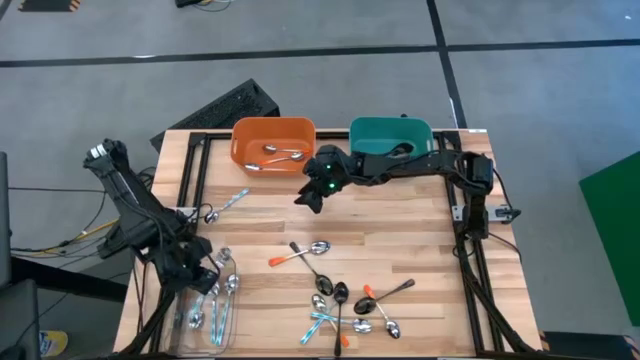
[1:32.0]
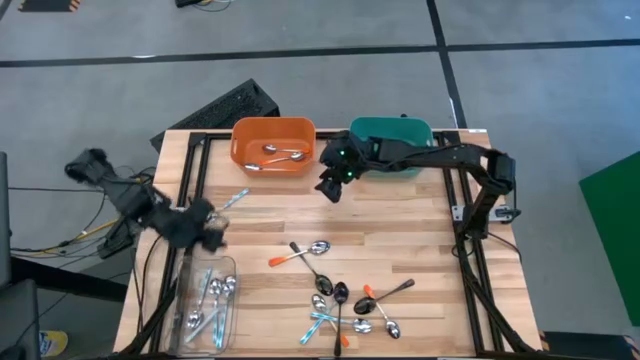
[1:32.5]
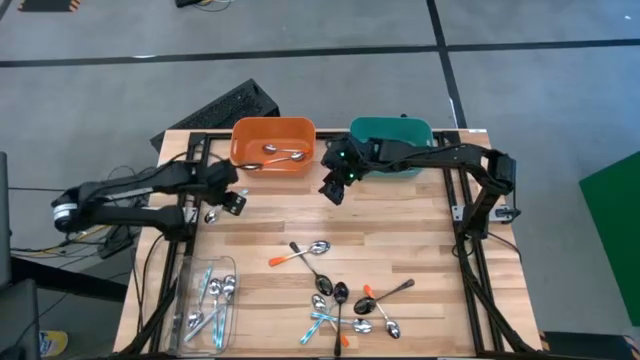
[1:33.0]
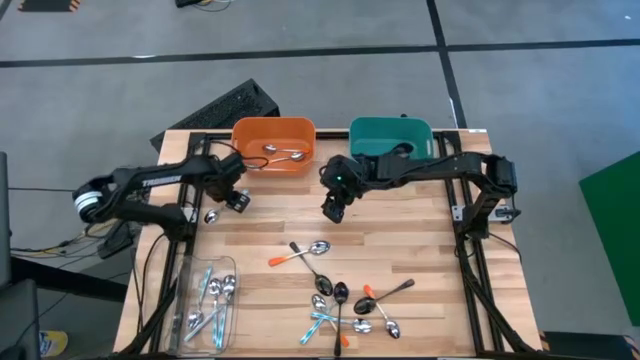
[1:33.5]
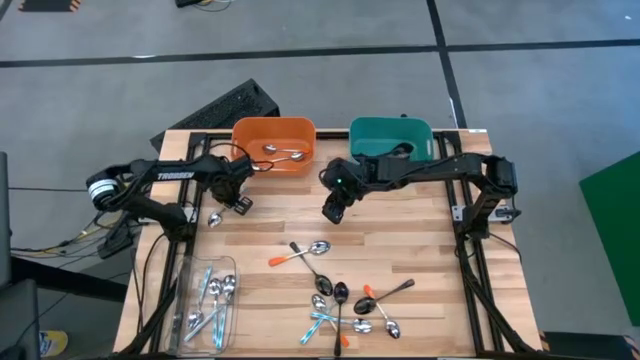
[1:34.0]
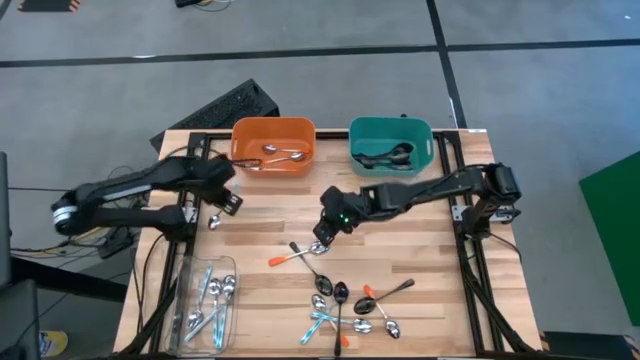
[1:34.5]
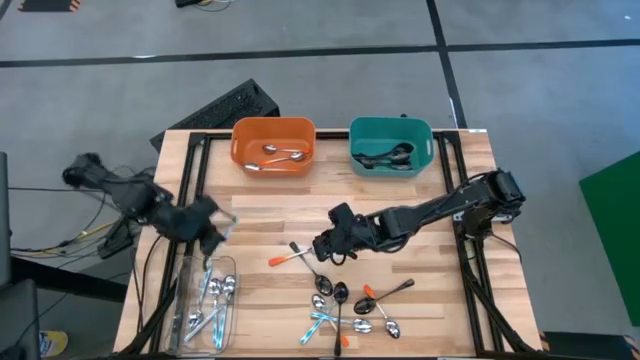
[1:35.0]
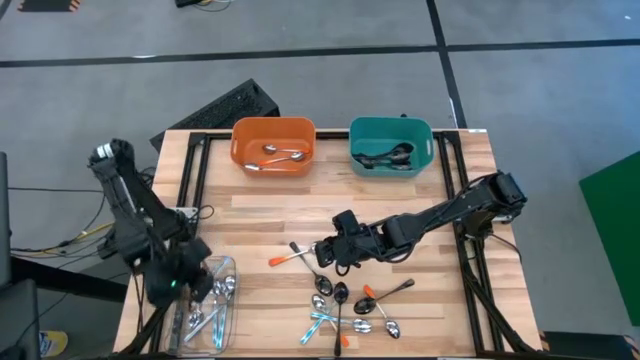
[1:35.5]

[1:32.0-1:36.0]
Task: Sort silverware by color (type)
Put the green spoon into the transparent bin

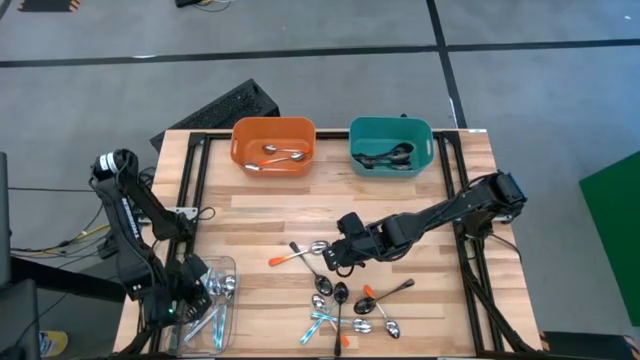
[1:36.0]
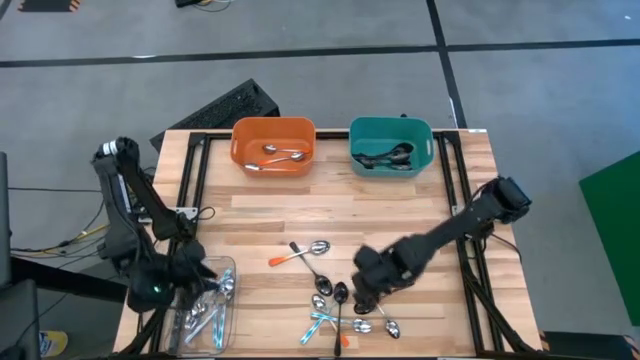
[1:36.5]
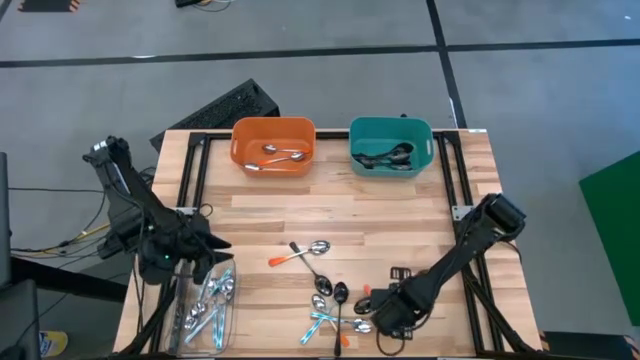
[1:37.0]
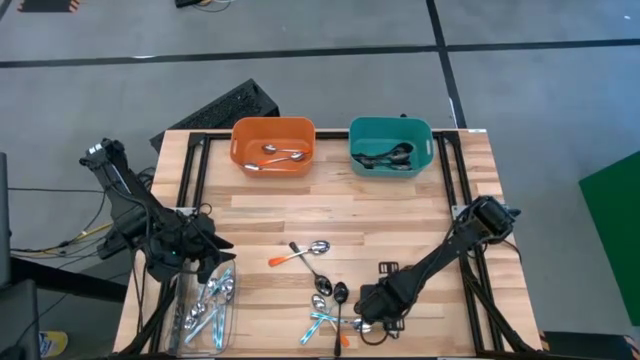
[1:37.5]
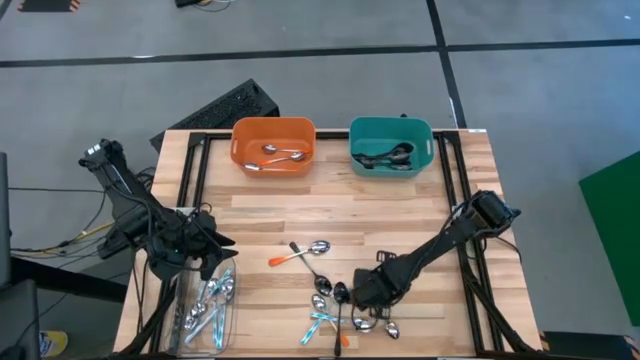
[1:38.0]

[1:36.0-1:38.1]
Put the black spoon into the blue bin

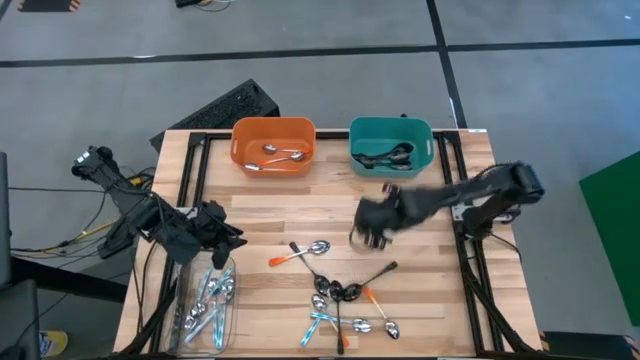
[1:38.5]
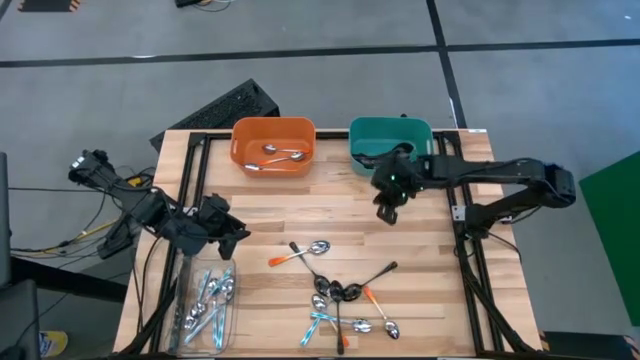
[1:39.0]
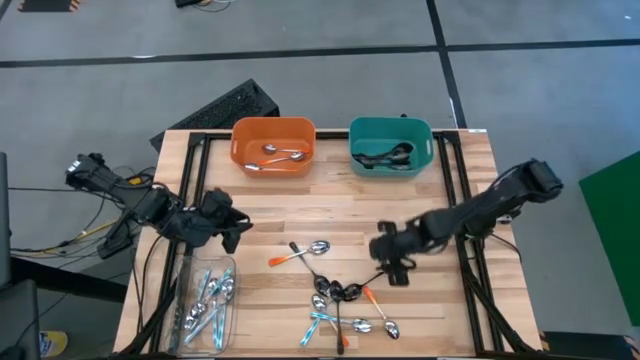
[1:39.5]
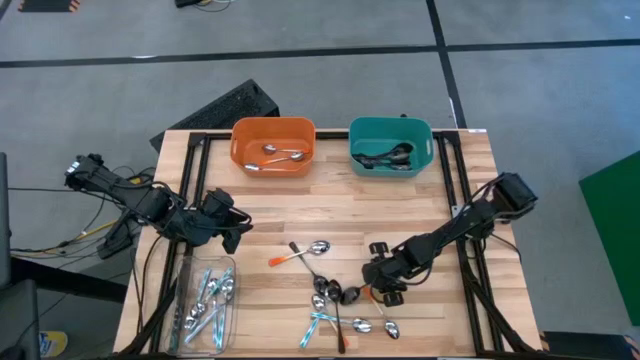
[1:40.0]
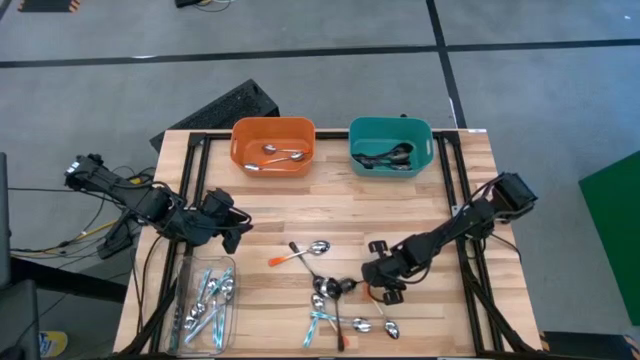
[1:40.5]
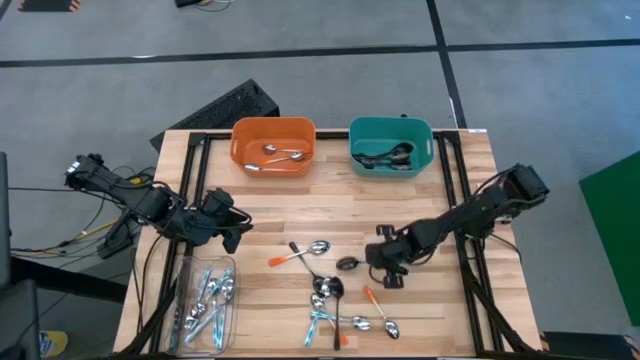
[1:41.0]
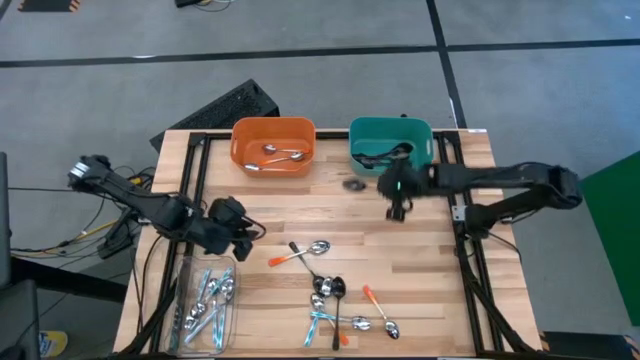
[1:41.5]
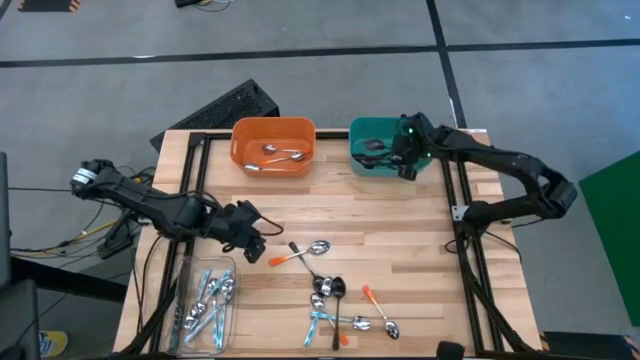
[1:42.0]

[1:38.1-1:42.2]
Put the black spoon into the blue bin

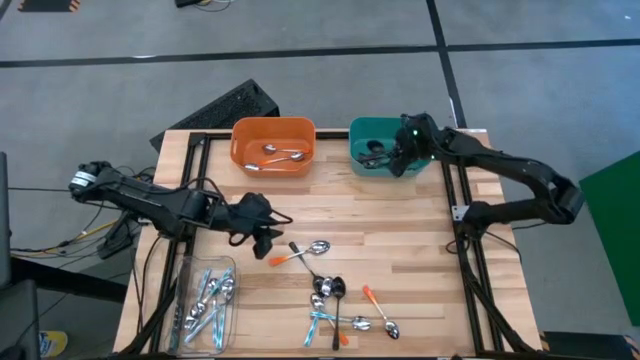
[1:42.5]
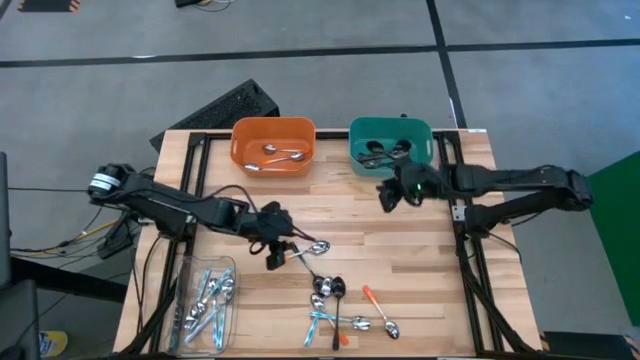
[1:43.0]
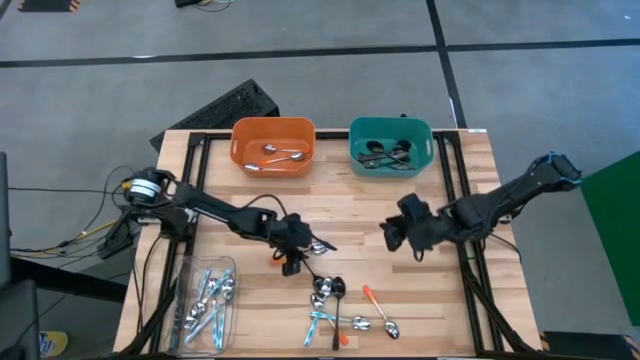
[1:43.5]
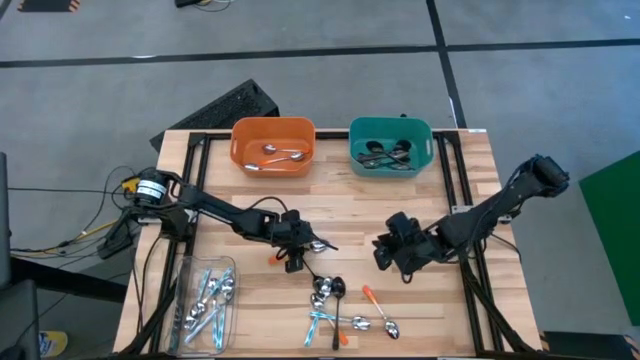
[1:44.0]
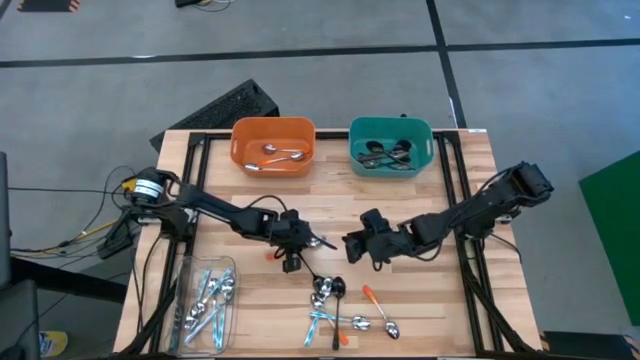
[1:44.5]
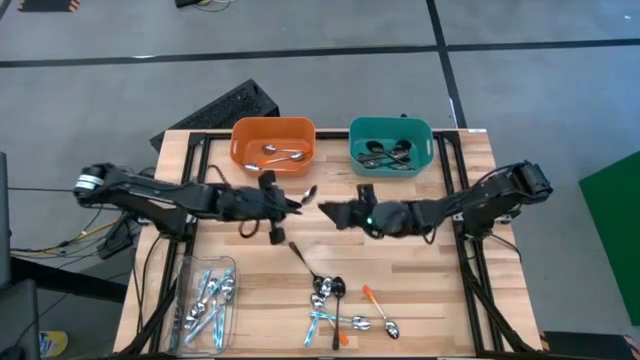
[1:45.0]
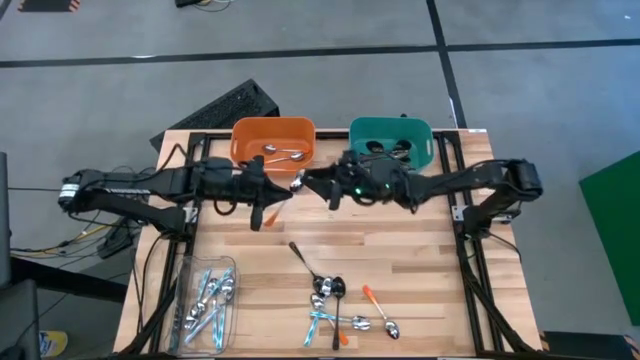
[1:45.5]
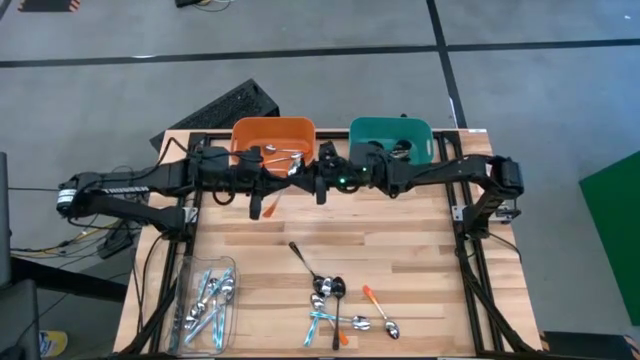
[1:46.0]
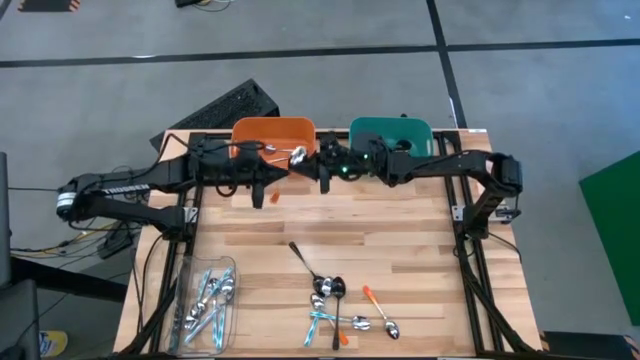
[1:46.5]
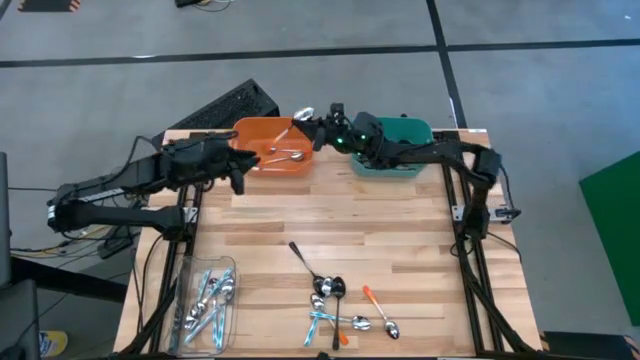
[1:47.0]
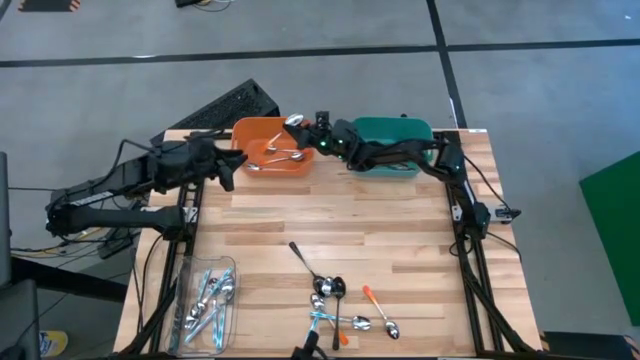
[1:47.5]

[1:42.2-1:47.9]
Put the orange spoon into the orange bin

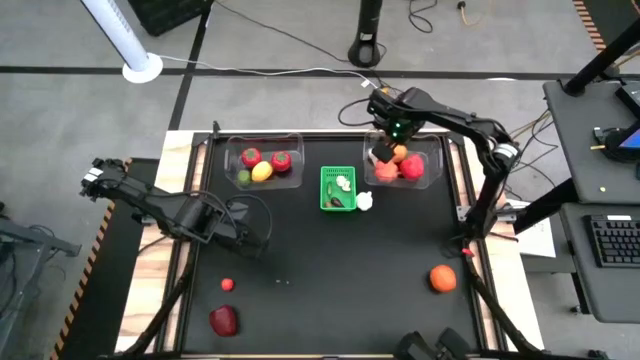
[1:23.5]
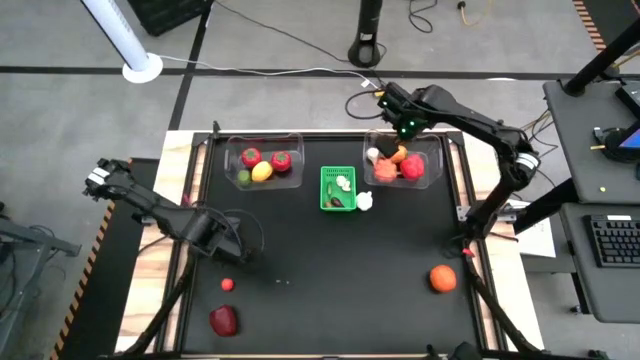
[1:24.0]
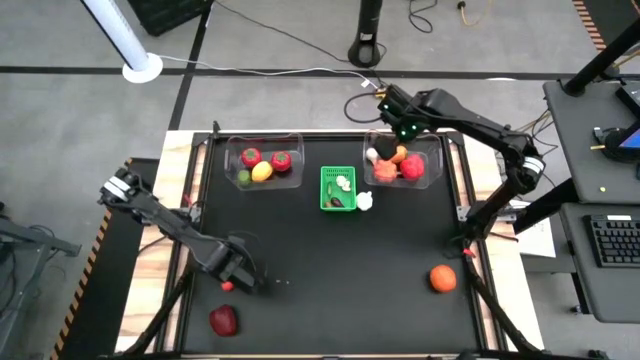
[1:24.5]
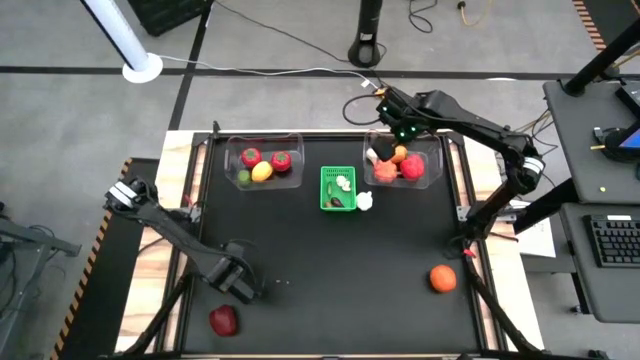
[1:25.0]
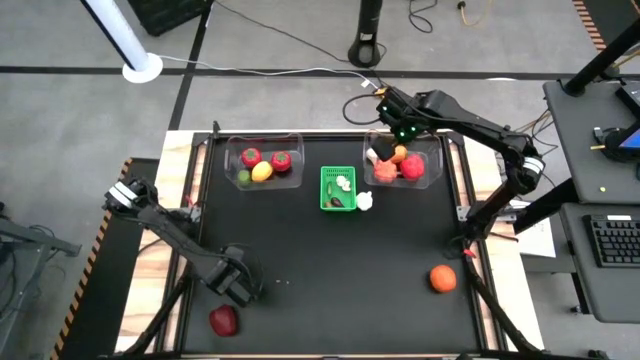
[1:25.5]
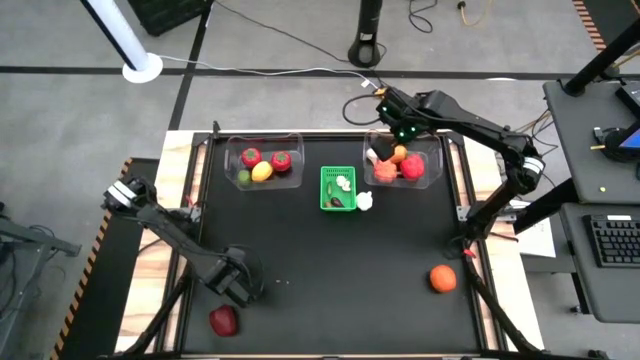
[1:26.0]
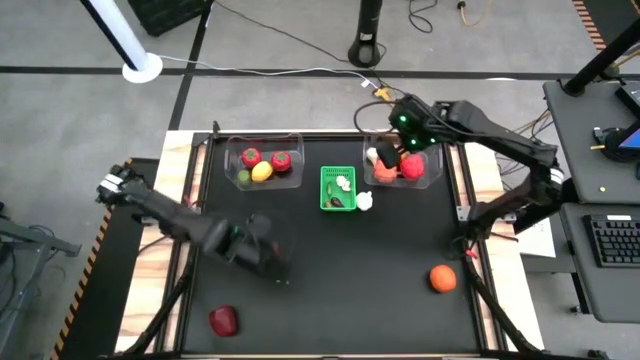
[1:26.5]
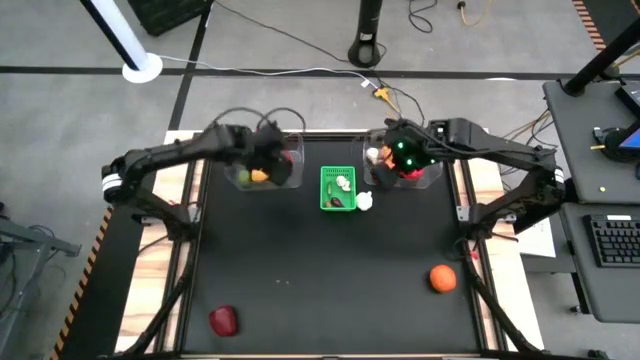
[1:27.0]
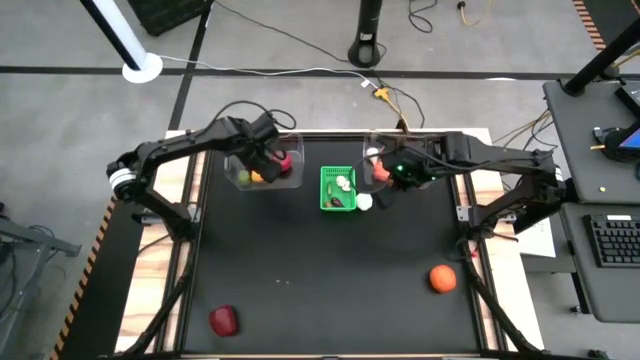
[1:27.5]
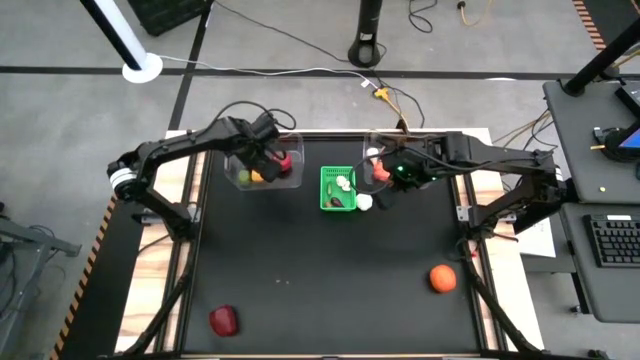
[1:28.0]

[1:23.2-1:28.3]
Task: Sort produce into baskets
Put the small tomato into the left transparent bin
